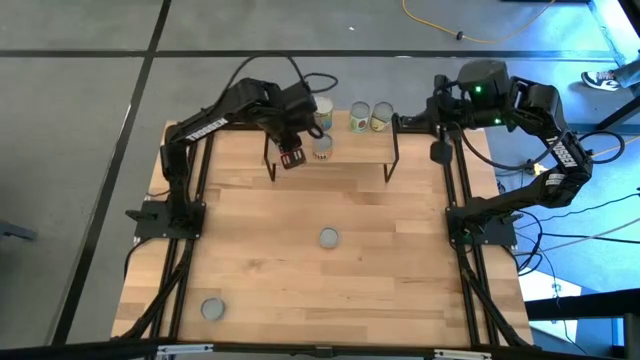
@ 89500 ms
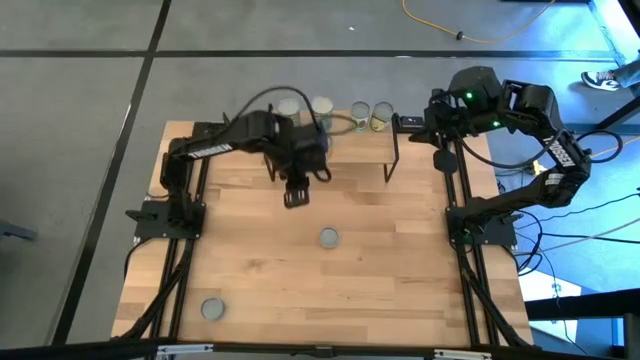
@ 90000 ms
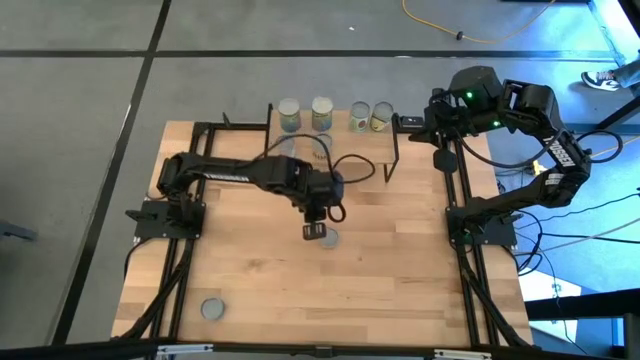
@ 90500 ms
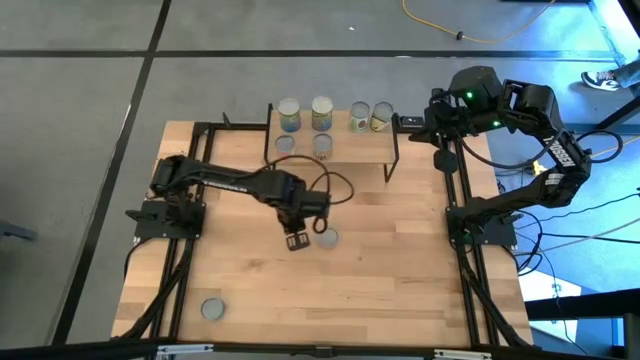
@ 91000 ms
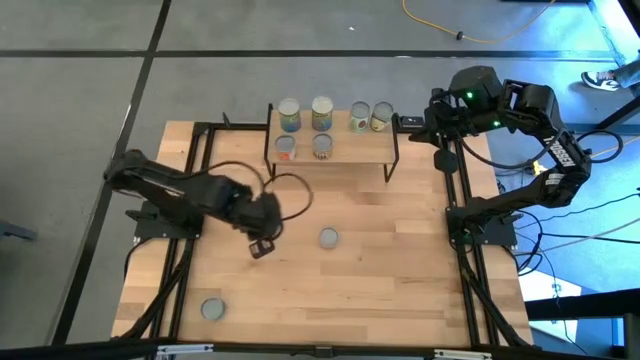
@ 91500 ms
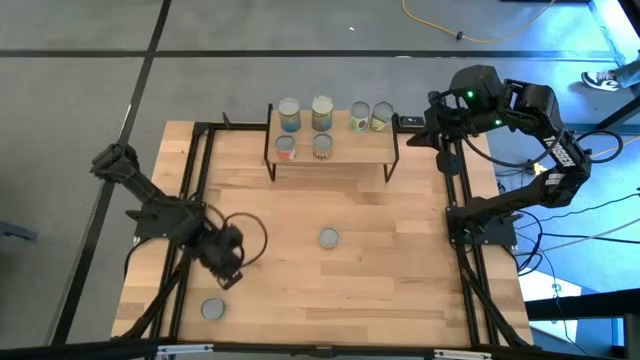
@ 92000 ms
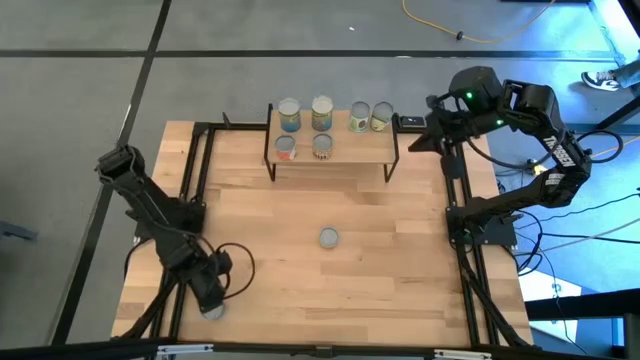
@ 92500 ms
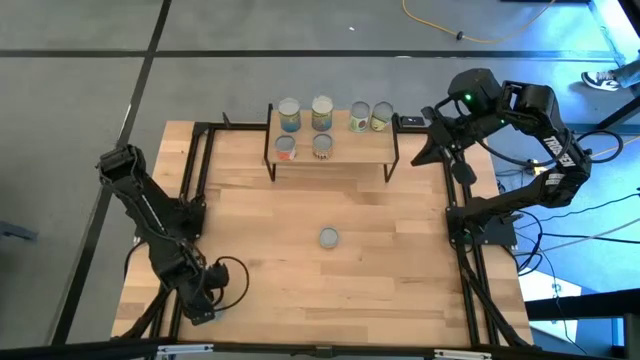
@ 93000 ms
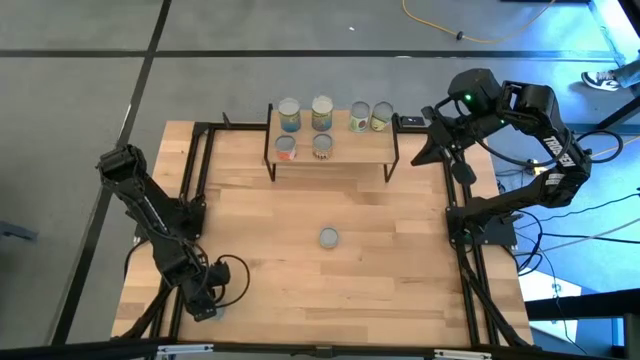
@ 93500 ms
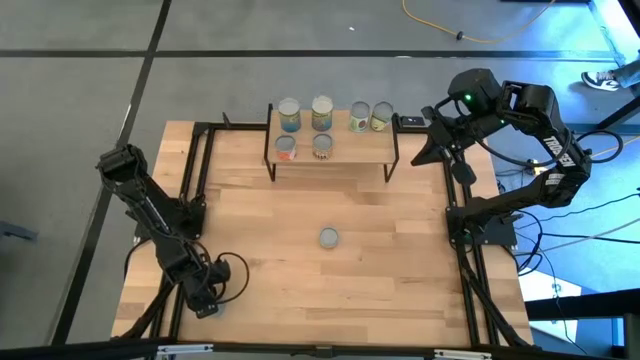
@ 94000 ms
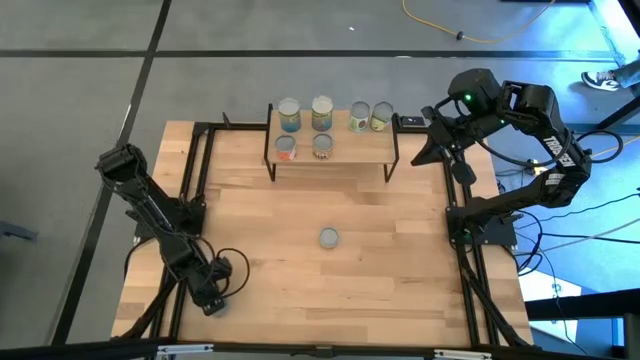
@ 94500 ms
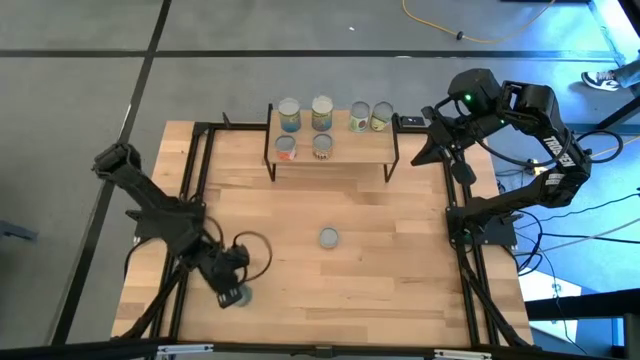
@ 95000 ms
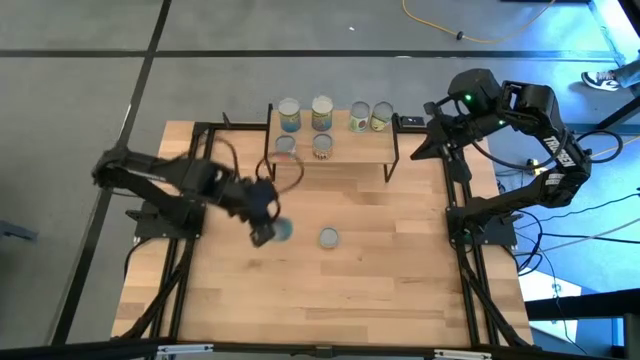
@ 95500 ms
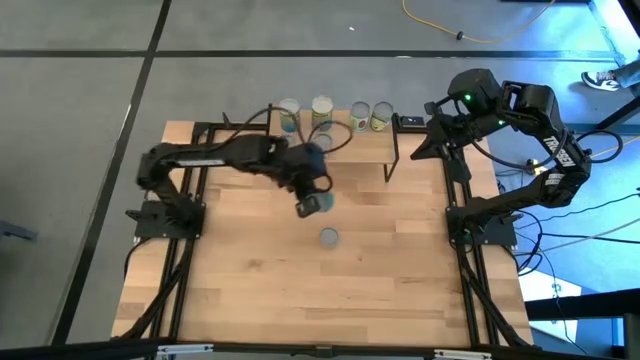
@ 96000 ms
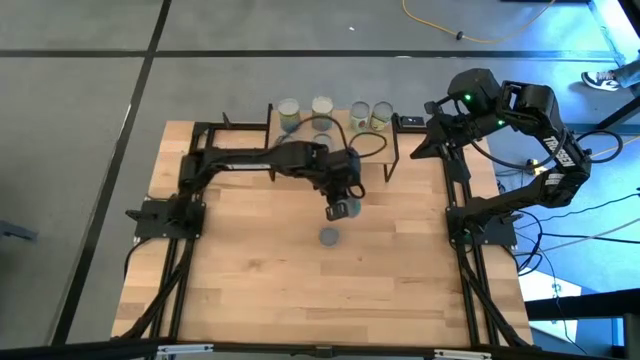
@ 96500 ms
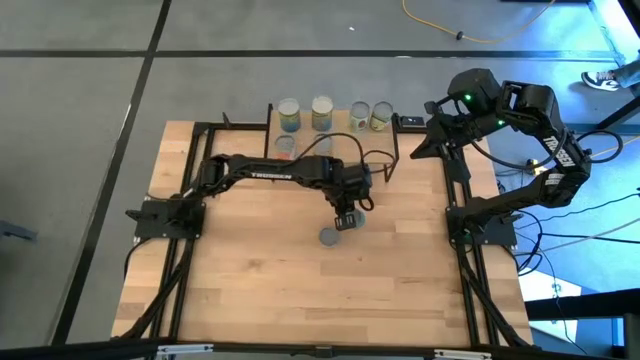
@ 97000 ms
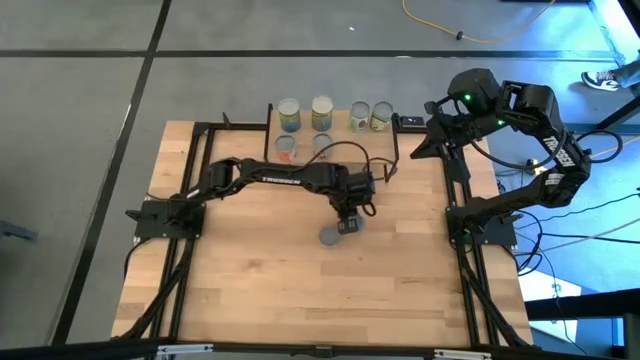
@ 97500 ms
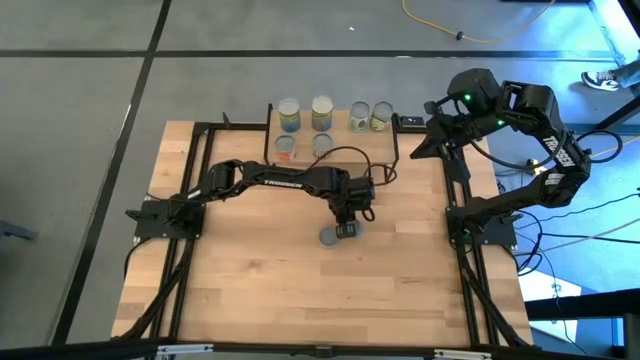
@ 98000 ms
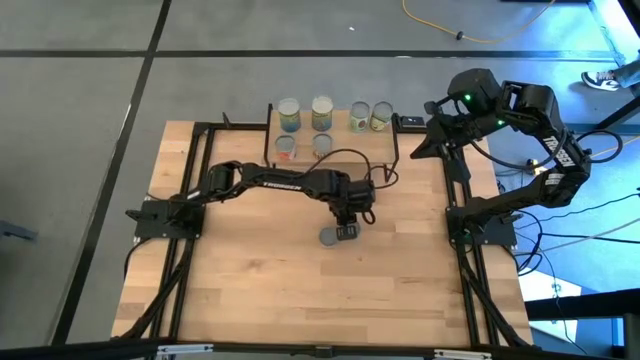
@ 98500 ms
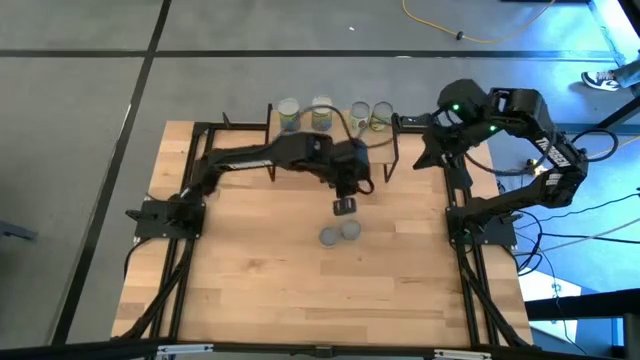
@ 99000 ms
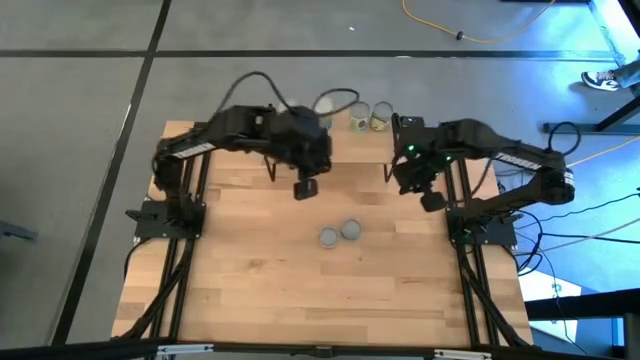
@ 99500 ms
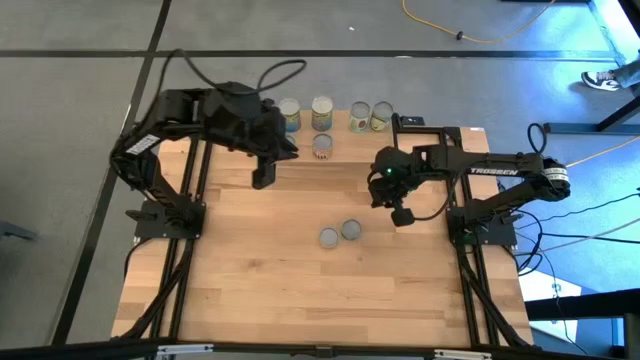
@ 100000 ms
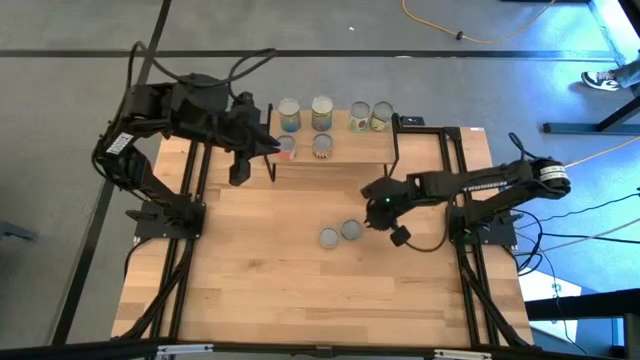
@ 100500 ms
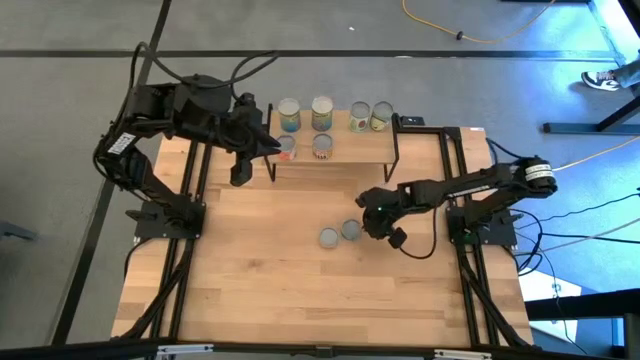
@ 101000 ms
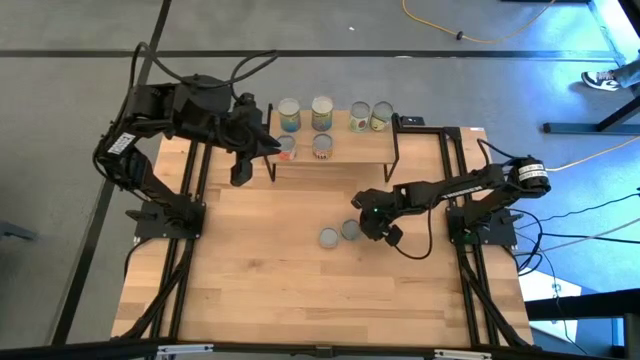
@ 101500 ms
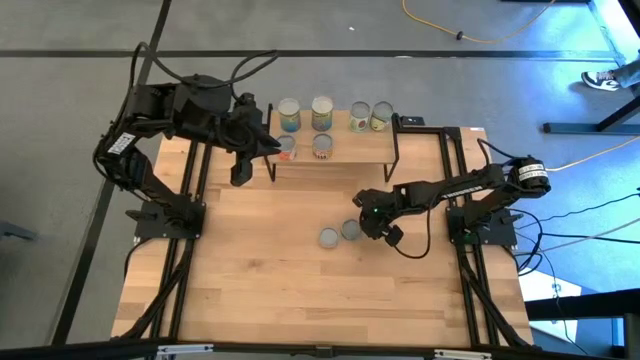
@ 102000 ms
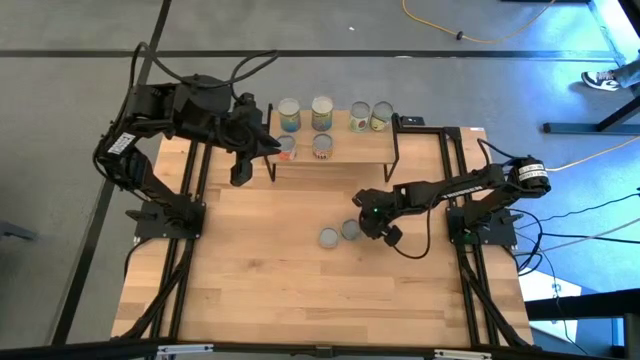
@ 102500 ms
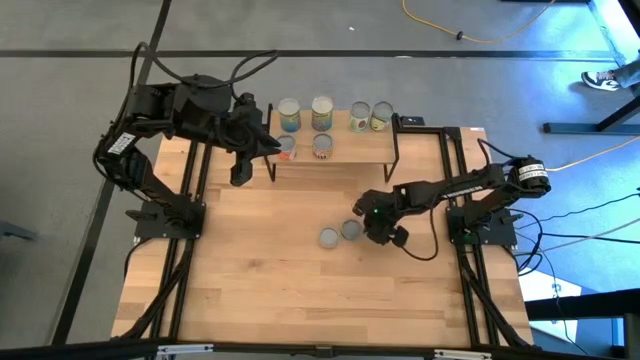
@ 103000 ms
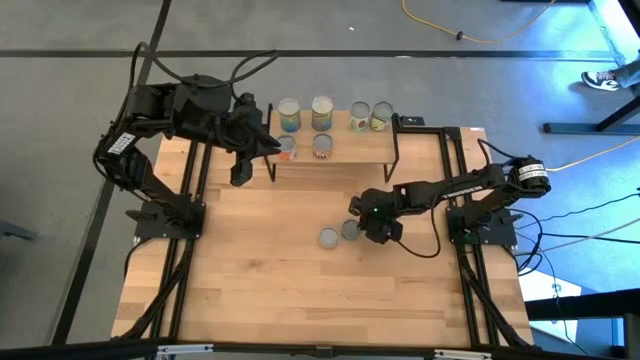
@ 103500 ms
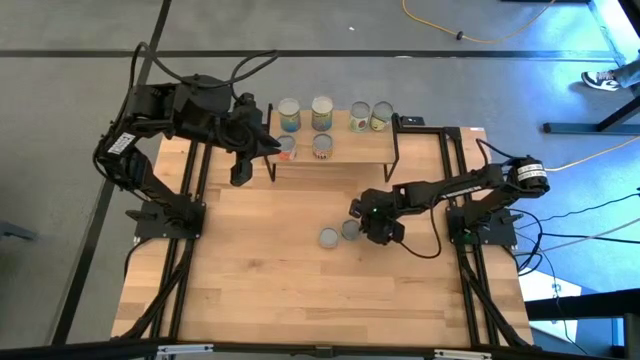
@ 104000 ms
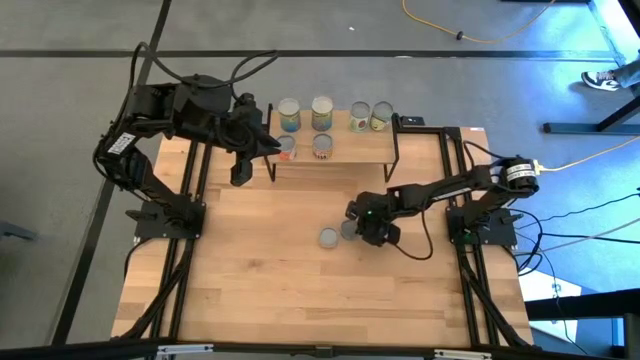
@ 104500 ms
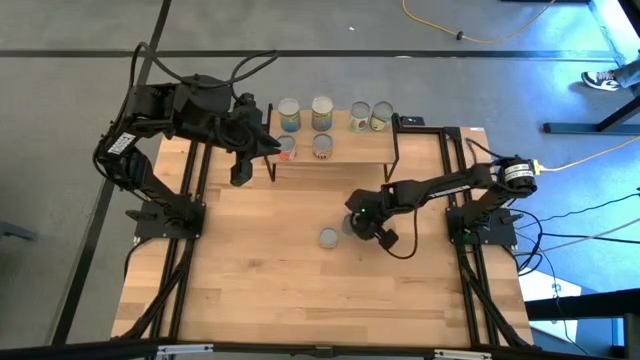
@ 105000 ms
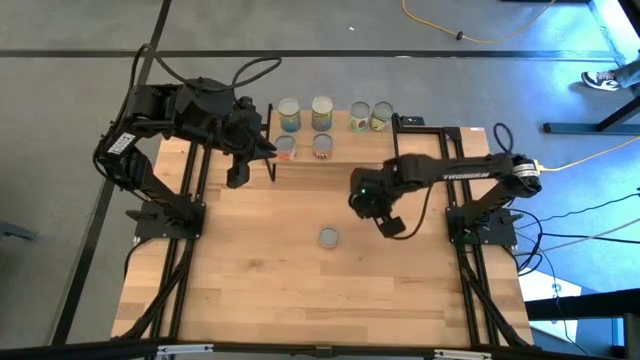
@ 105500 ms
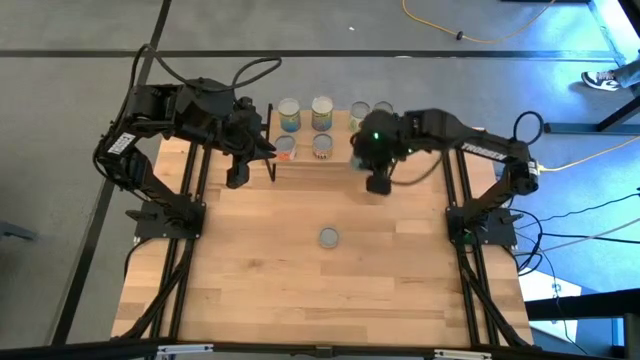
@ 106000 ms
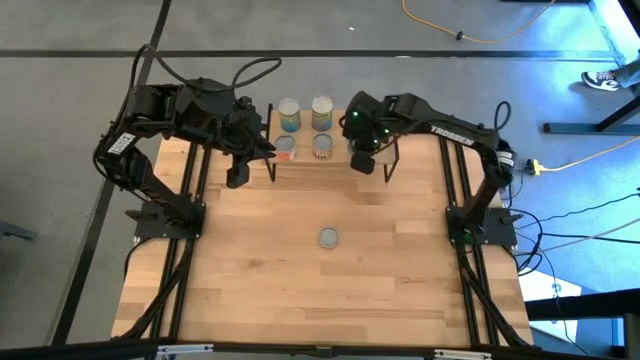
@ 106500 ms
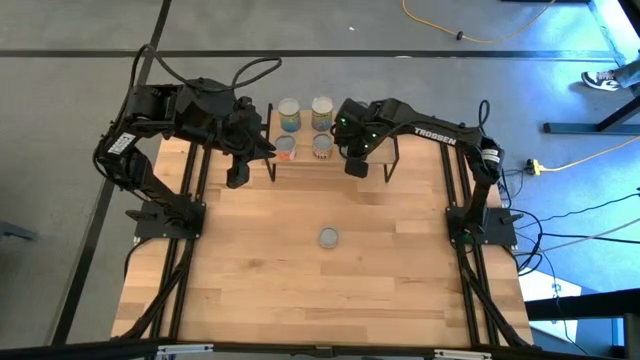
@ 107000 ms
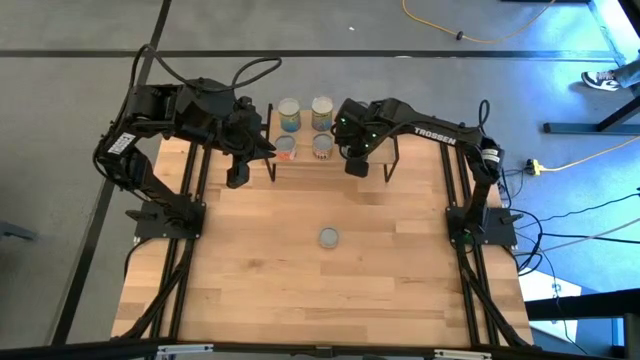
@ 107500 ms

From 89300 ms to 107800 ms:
Task: Pick and place cans onto a shelf
Put the canned tuna on the shelf
